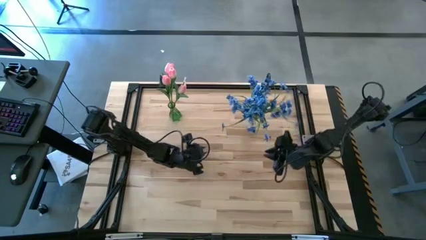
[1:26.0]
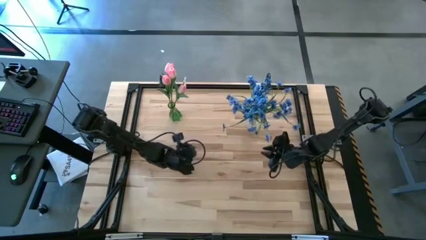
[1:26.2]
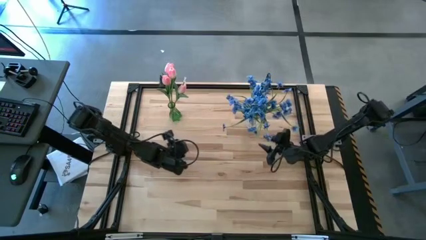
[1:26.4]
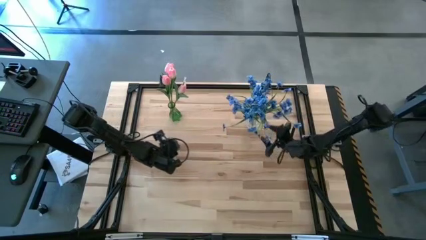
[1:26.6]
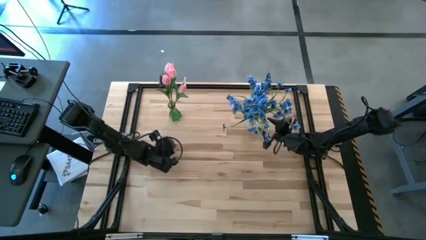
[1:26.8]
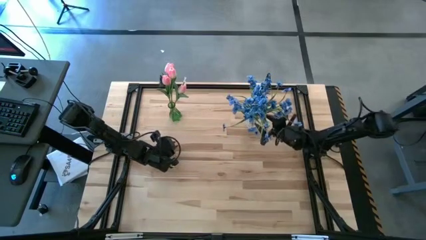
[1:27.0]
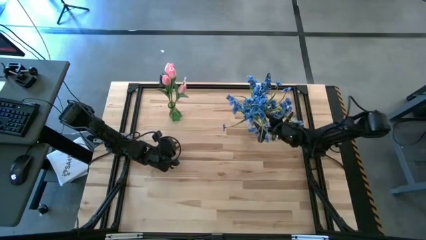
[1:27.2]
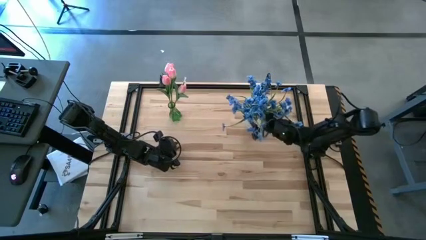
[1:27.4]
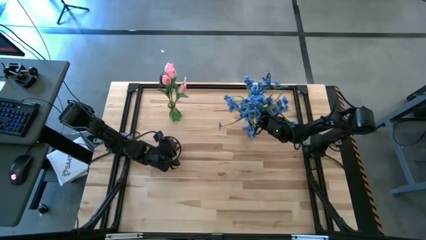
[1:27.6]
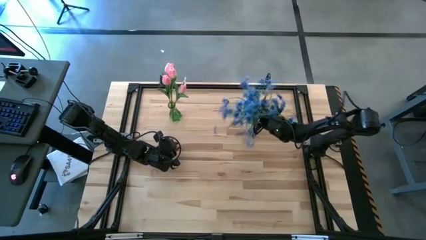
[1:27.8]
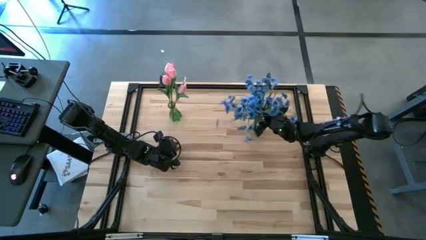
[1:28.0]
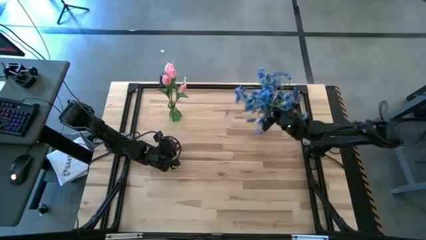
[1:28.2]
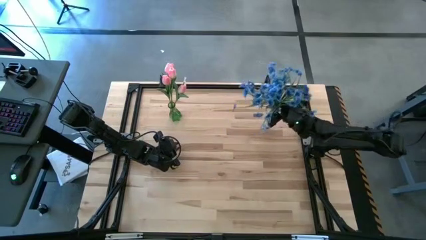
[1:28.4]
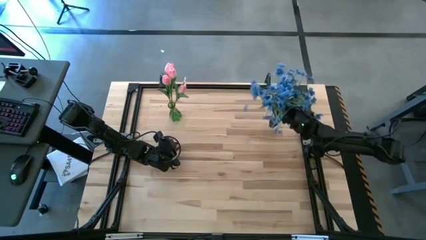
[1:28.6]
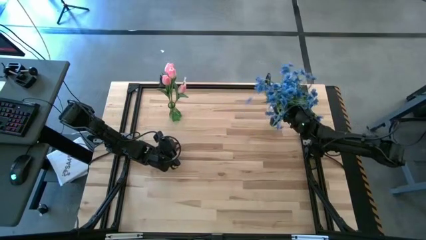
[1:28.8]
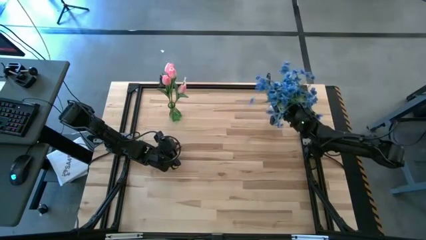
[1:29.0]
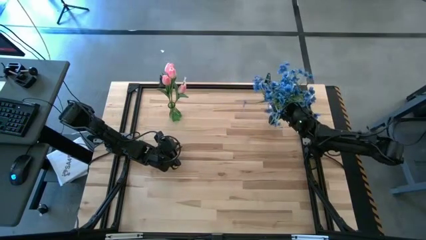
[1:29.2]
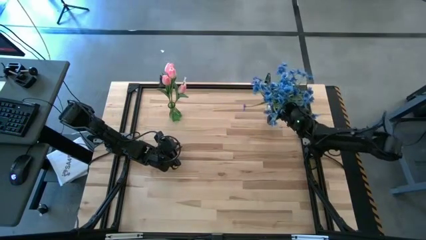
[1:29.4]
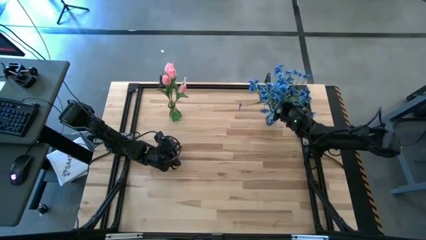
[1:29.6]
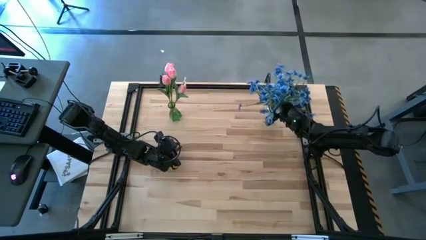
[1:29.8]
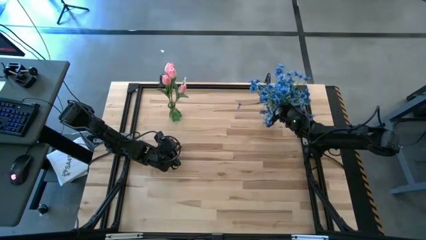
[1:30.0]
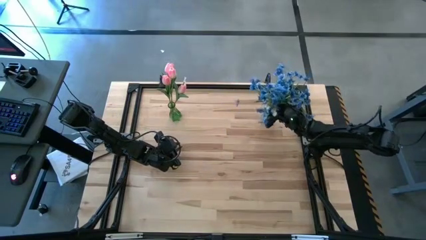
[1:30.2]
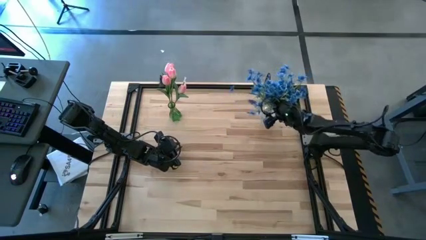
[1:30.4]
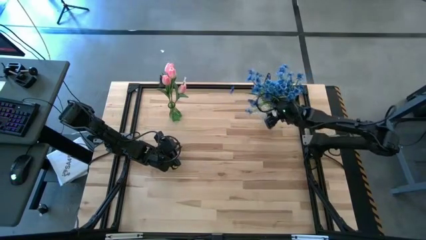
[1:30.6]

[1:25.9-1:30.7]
Task: Sort flowers into vase by color
Move the transparent vase to the right of the table

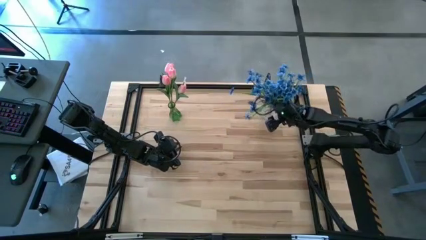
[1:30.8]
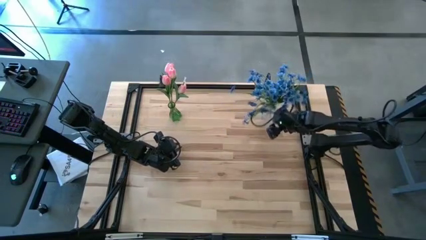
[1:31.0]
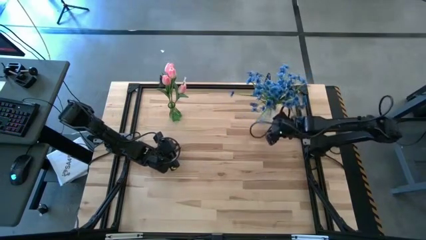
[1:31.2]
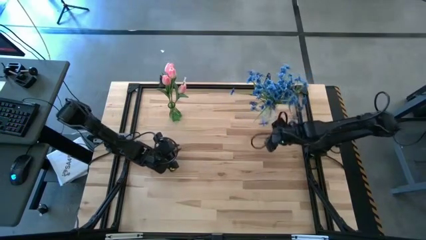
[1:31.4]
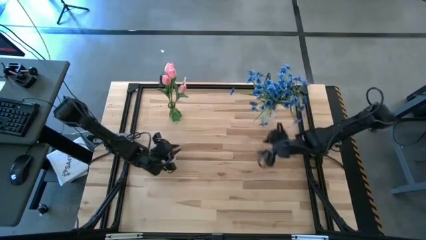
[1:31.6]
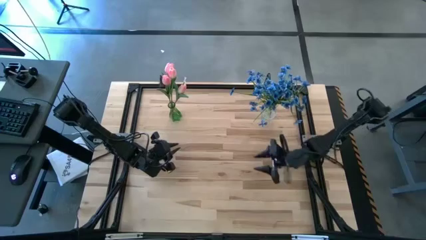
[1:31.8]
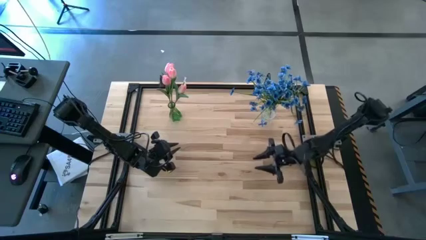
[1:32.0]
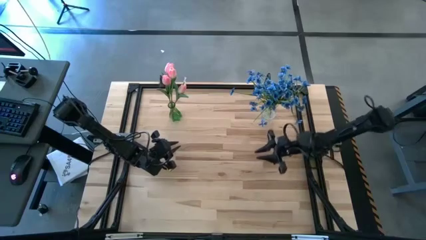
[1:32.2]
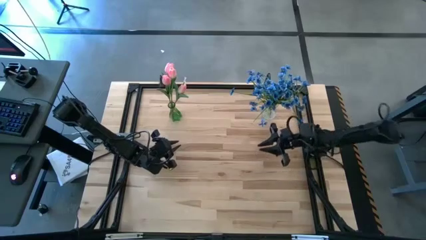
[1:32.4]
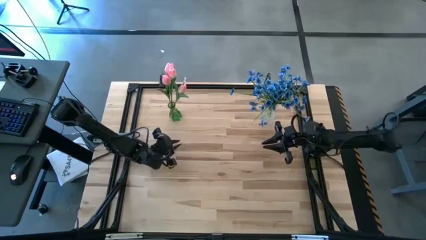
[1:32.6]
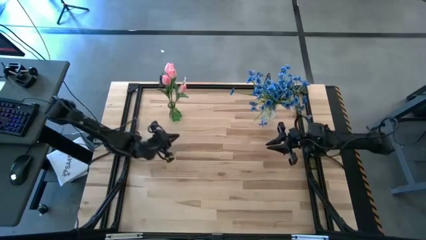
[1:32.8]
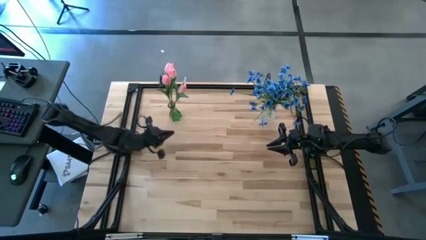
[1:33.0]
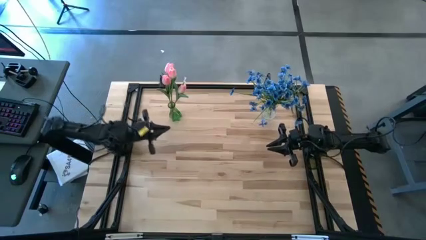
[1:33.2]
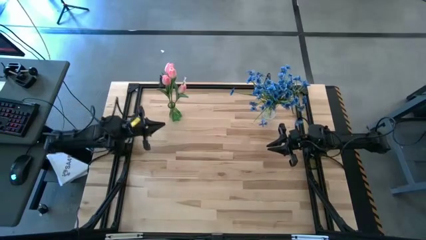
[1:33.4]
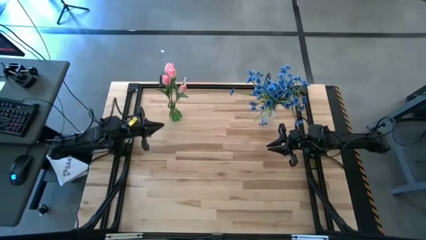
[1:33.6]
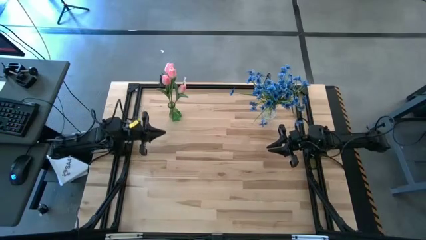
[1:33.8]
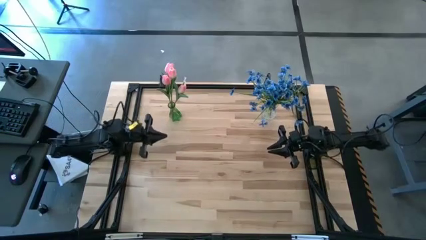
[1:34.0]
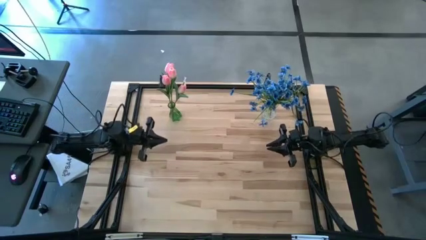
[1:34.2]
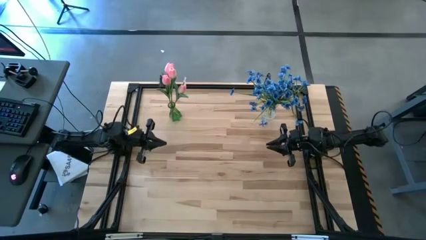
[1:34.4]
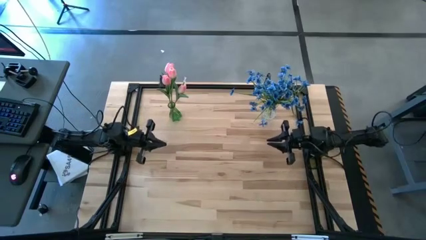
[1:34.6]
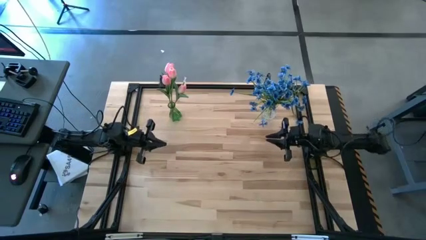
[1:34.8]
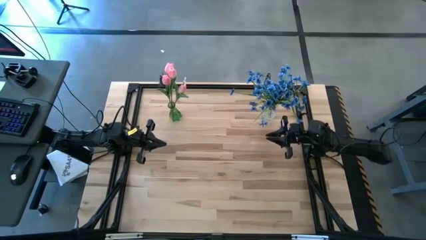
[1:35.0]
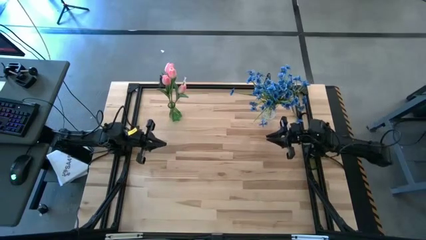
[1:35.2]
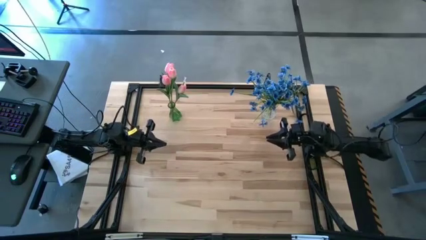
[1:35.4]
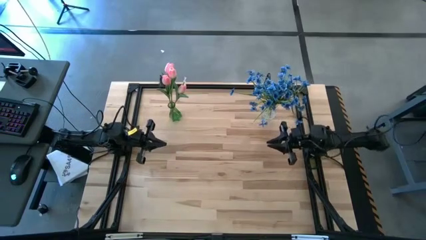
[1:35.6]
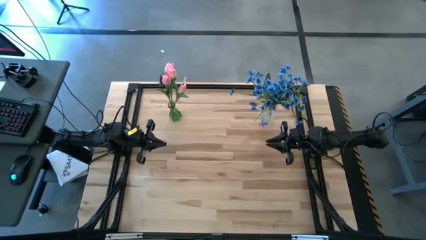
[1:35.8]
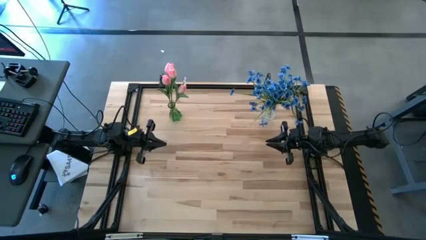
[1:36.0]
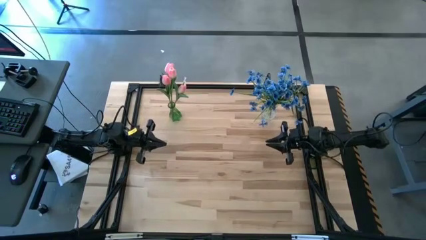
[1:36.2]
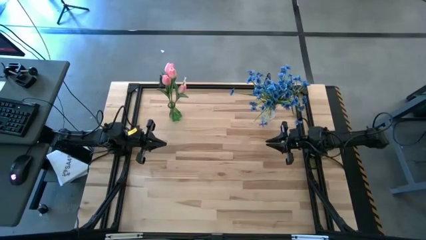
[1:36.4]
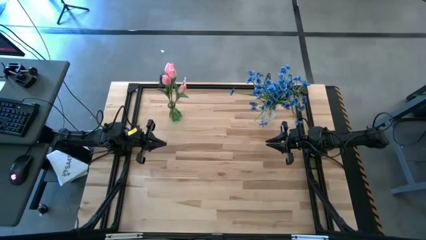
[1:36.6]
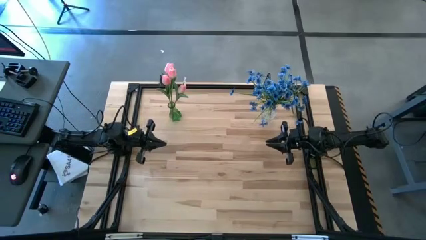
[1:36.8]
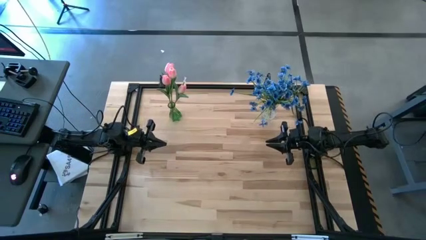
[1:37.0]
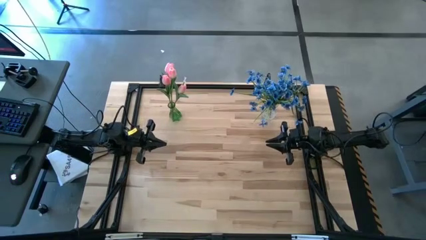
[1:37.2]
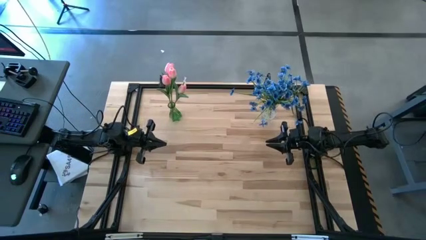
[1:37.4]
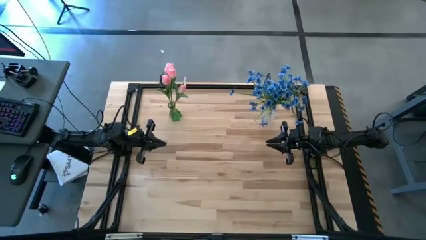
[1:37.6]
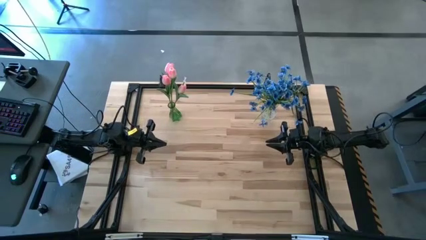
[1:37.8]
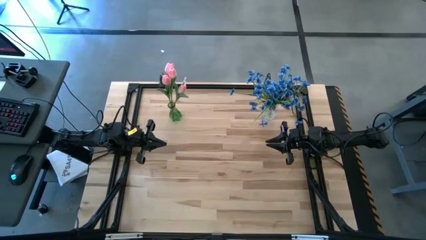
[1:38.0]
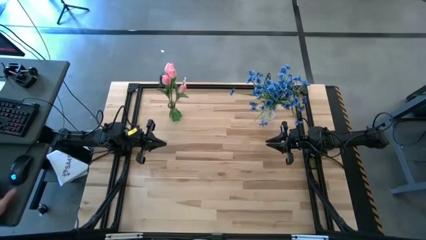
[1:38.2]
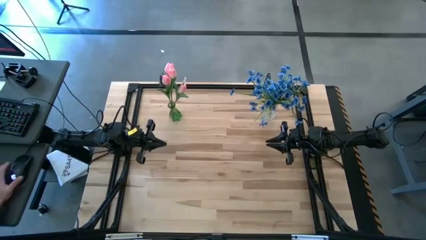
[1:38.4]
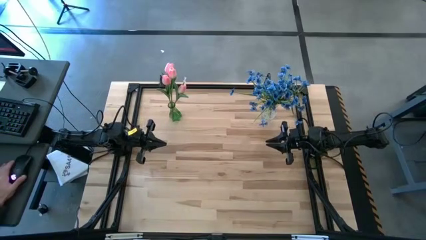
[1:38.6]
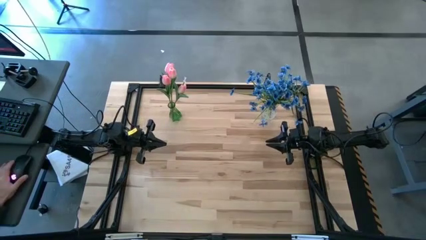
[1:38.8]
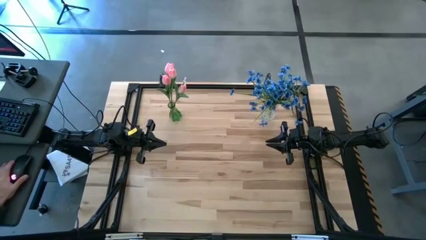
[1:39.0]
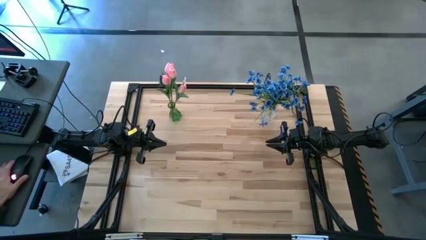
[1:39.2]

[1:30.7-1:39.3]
Return to Home Position

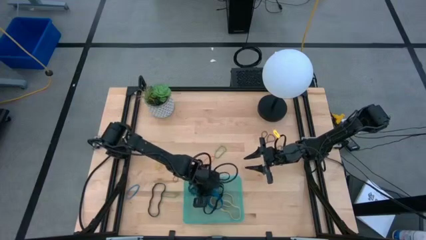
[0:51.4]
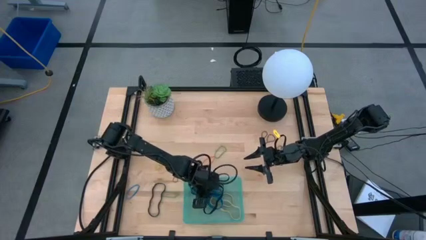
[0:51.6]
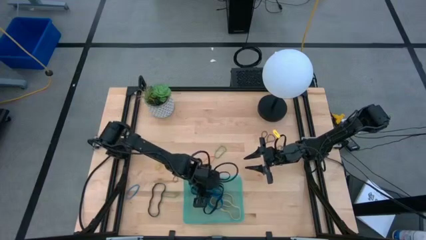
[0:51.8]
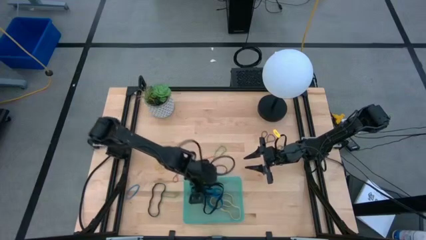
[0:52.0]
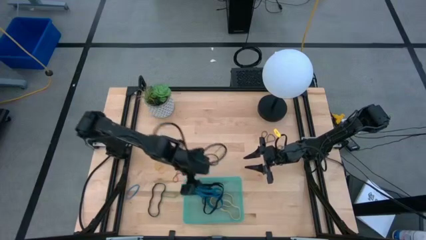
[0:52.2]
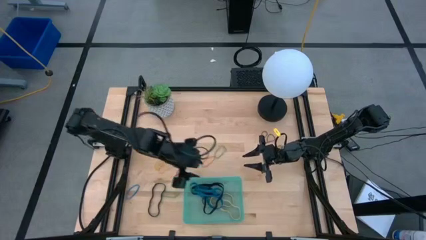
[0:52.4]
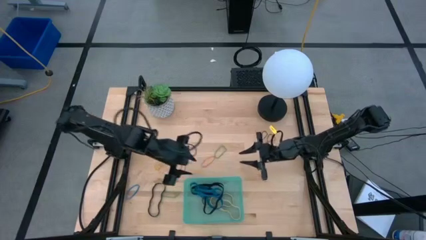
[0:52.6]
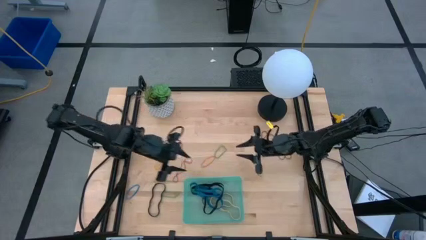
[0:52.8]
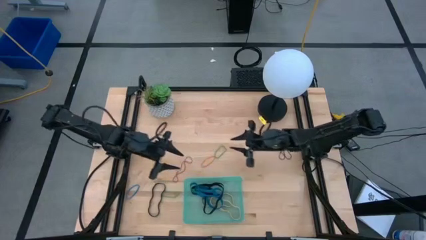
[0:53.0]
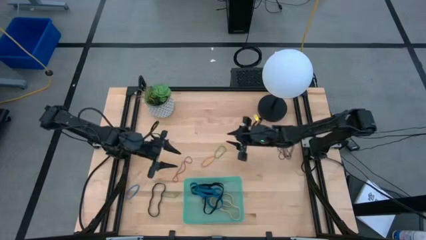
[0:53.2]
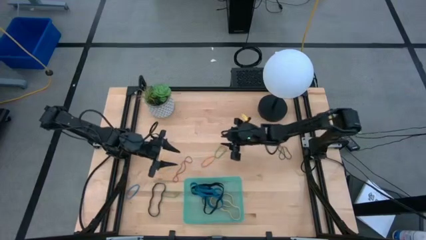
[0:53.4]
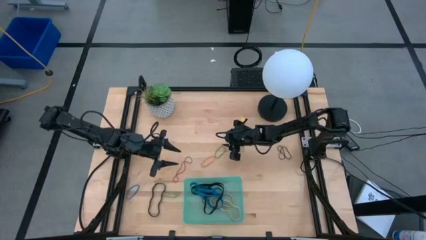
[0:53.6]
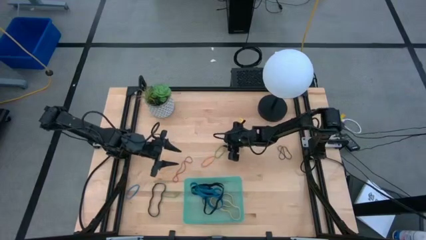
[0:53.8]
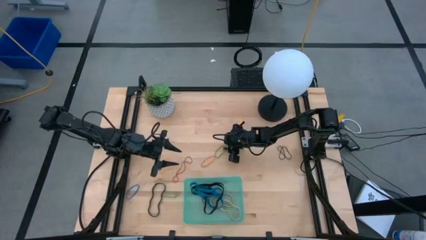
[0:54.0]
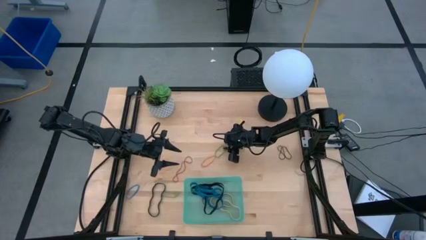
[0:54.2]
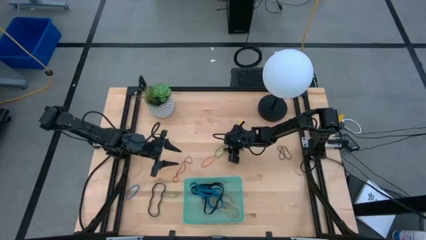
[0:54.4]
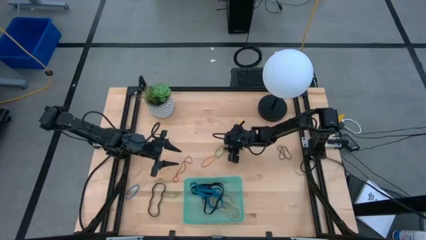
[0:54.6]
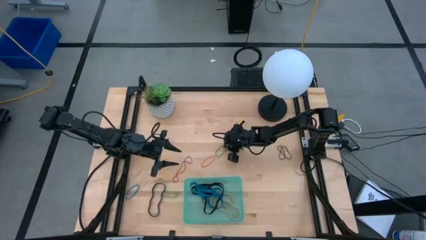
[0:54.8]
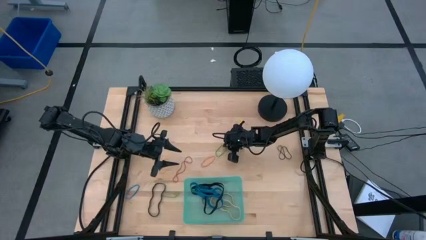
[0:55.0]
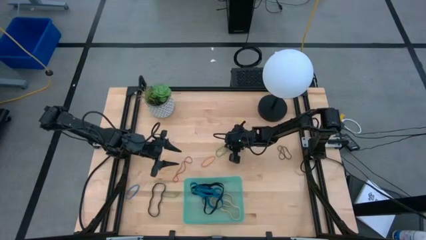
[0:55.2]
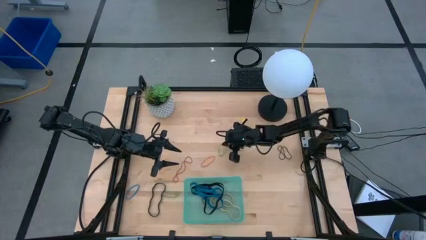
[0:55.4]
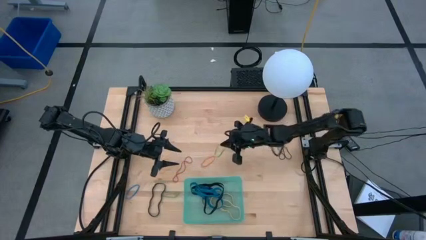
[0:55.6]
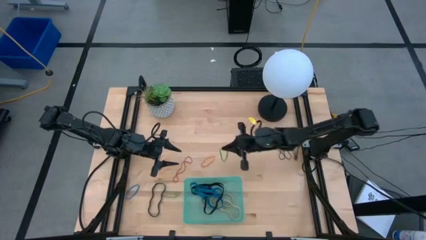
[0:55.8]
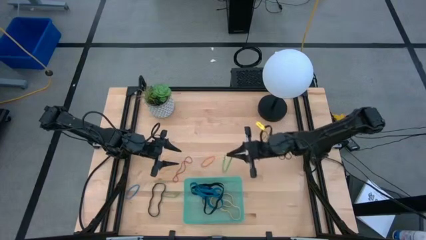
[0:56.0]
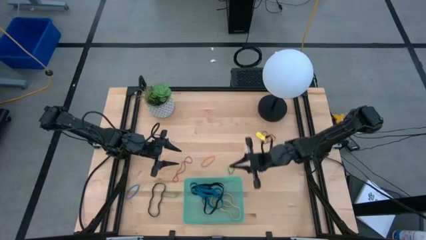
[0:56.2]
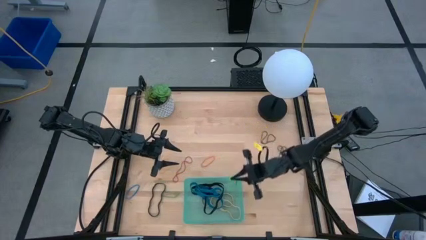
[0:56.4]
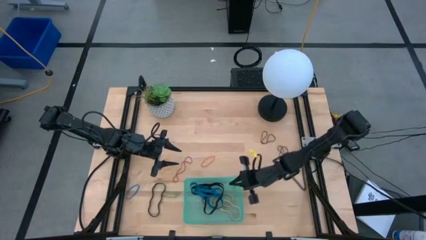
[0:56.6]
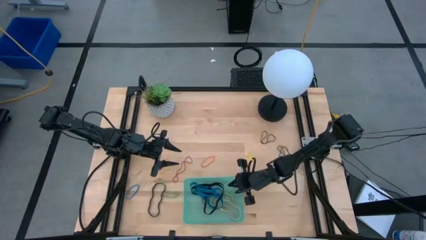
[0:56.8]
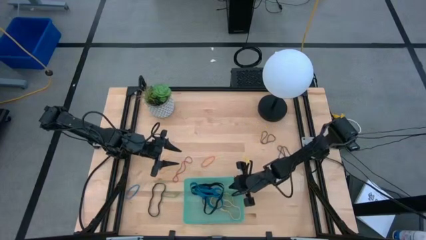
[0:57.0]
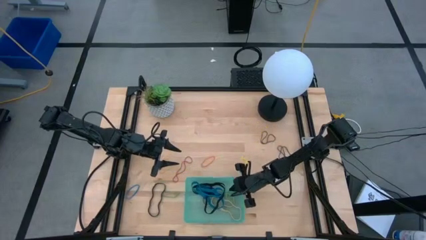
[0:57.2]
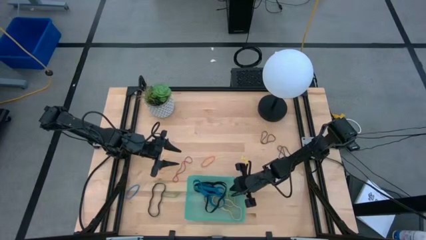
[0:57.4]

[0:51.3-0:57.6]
Task: Pick and place rubber bands into bin
Put the top small green rubberband into the green bin
